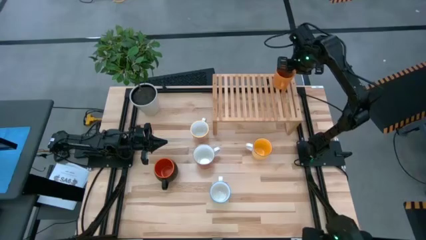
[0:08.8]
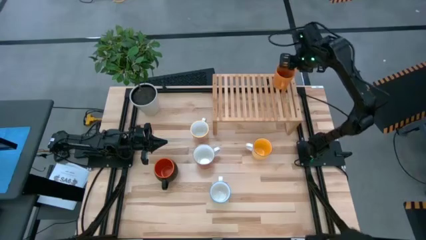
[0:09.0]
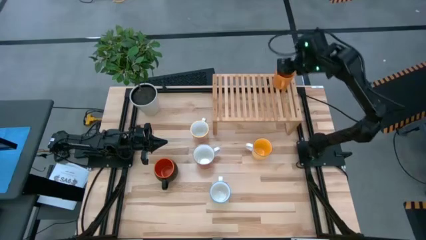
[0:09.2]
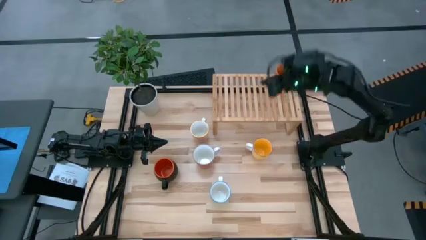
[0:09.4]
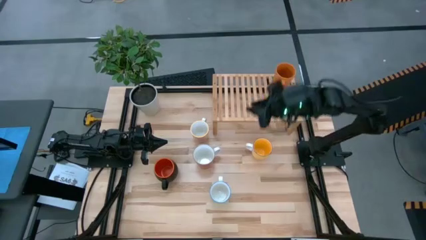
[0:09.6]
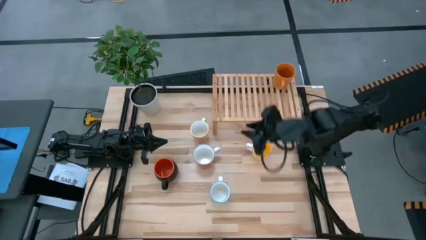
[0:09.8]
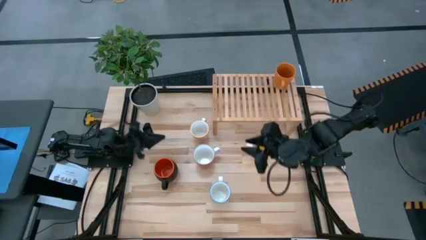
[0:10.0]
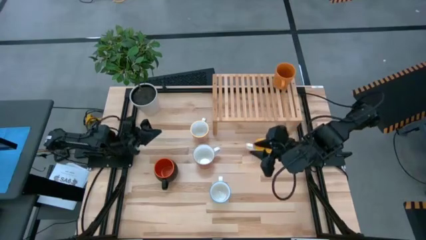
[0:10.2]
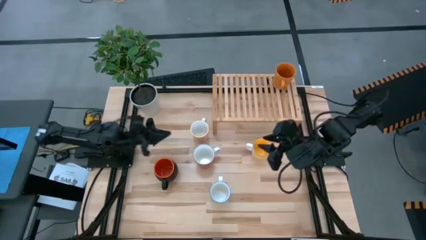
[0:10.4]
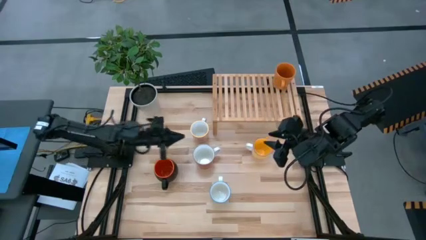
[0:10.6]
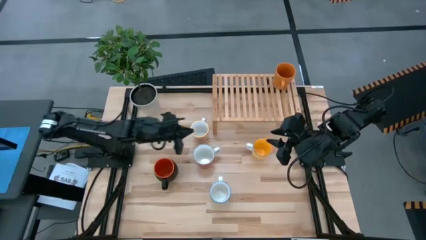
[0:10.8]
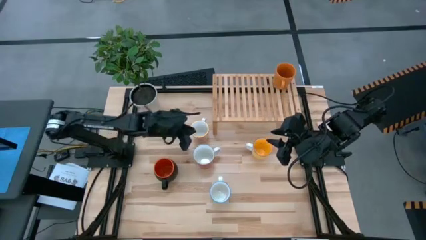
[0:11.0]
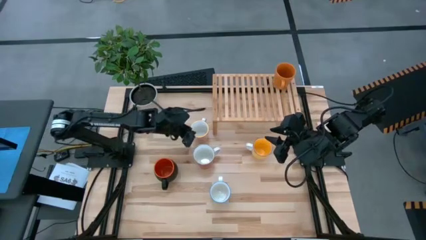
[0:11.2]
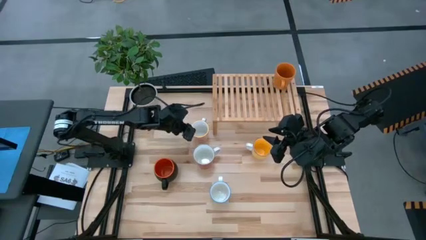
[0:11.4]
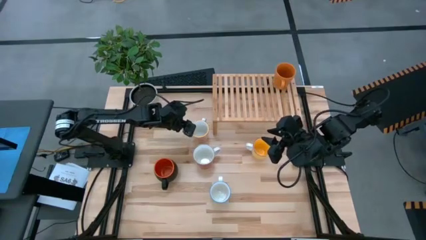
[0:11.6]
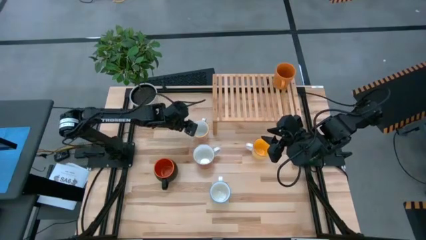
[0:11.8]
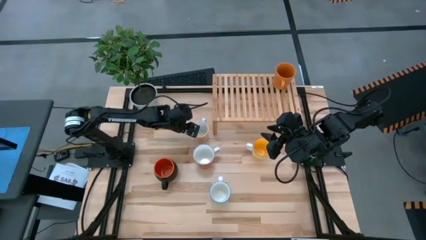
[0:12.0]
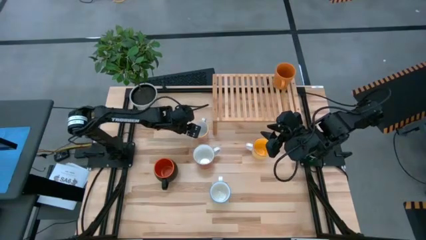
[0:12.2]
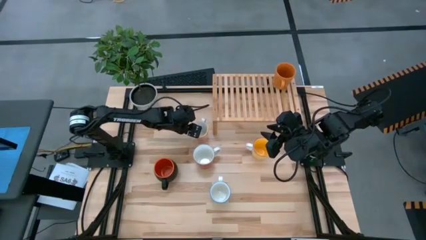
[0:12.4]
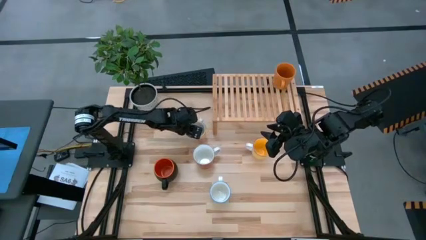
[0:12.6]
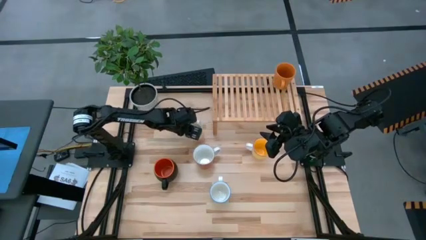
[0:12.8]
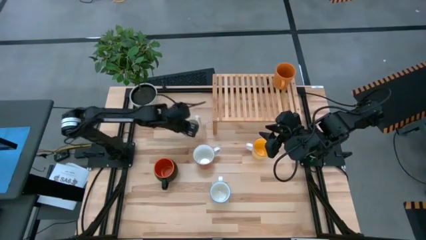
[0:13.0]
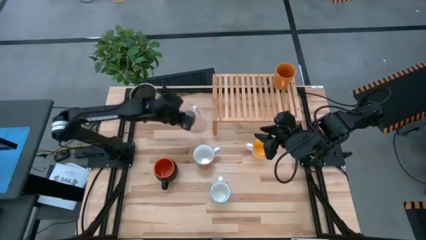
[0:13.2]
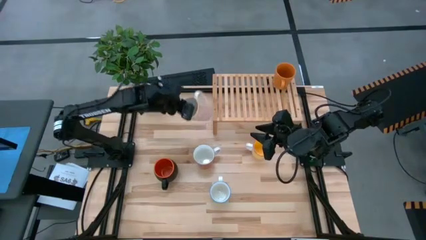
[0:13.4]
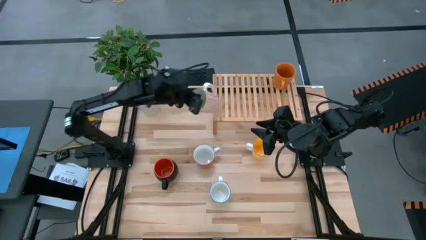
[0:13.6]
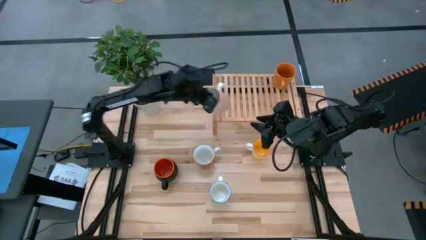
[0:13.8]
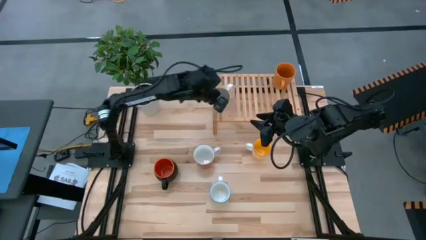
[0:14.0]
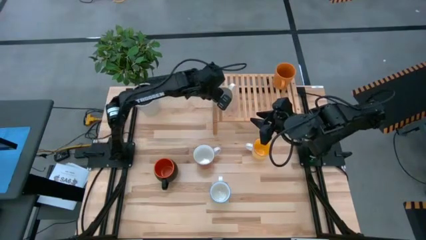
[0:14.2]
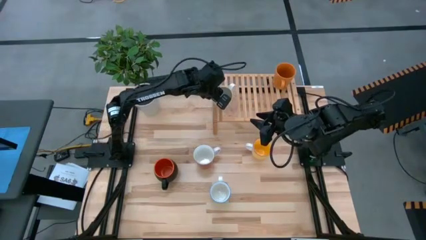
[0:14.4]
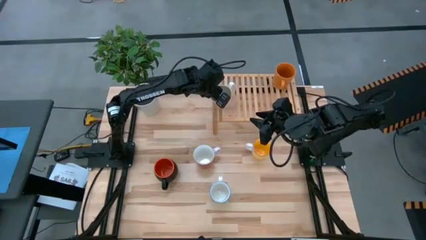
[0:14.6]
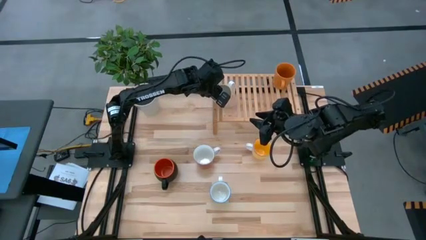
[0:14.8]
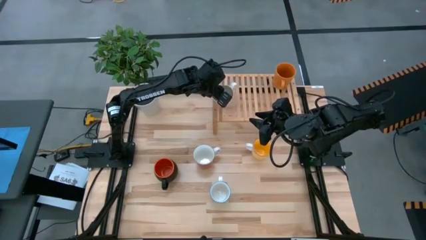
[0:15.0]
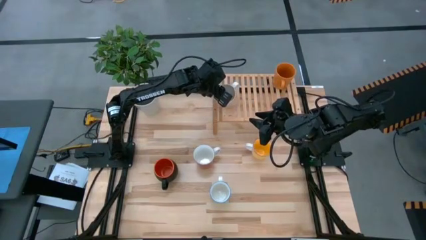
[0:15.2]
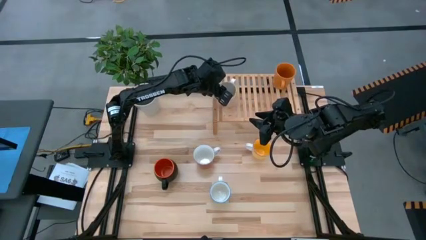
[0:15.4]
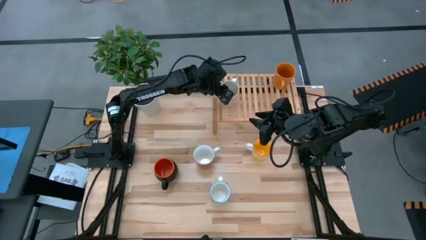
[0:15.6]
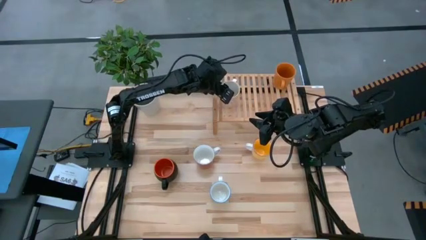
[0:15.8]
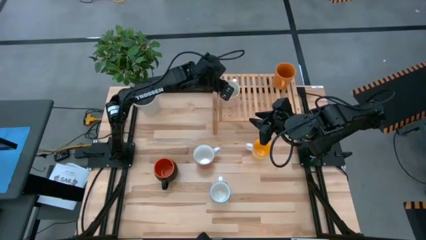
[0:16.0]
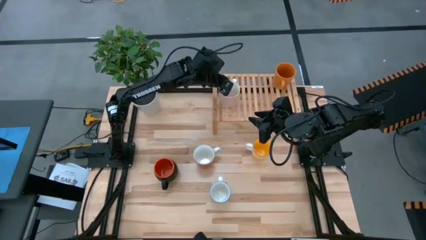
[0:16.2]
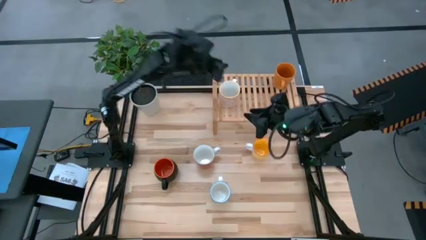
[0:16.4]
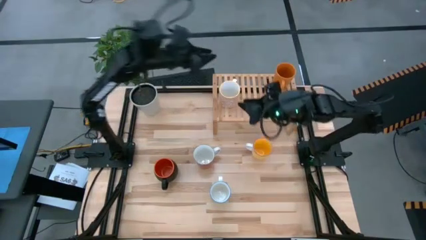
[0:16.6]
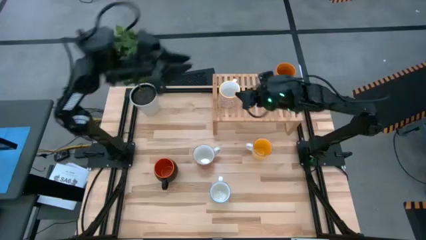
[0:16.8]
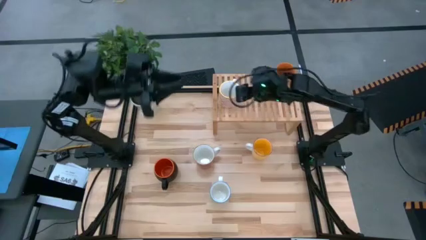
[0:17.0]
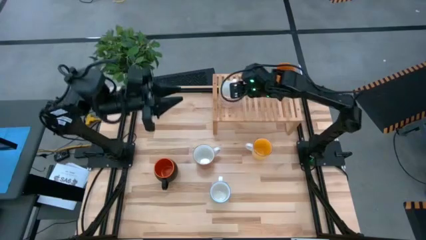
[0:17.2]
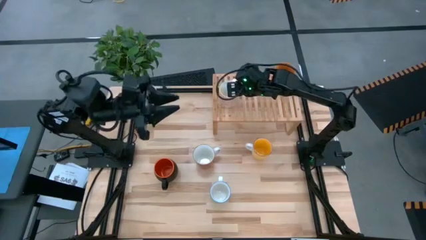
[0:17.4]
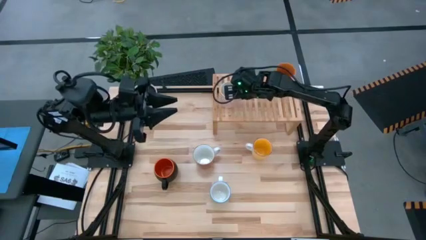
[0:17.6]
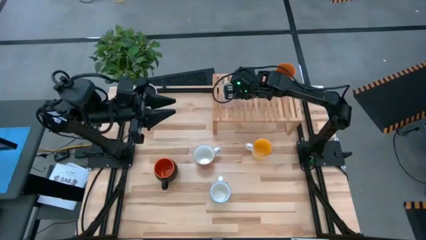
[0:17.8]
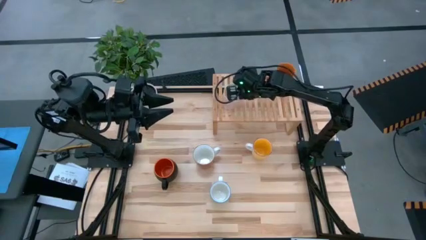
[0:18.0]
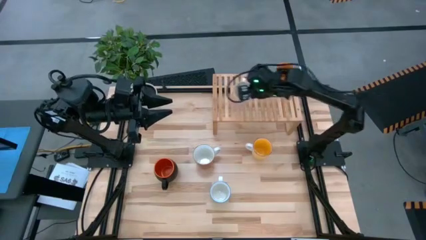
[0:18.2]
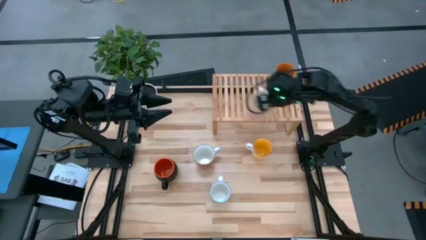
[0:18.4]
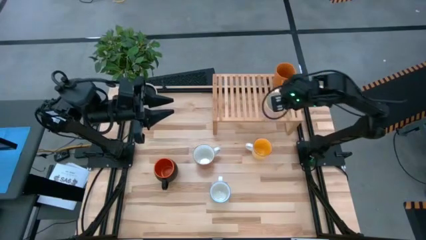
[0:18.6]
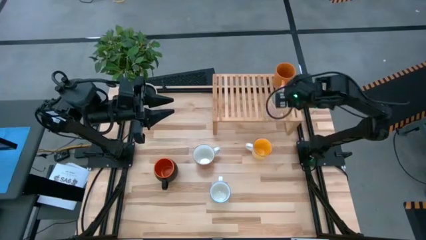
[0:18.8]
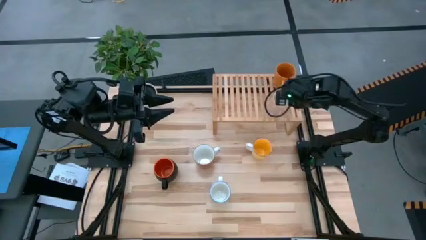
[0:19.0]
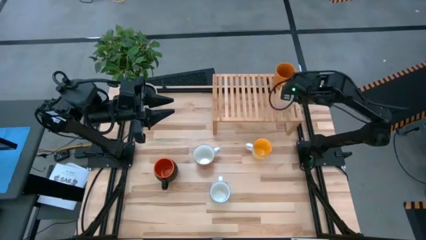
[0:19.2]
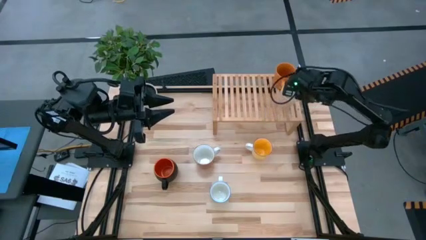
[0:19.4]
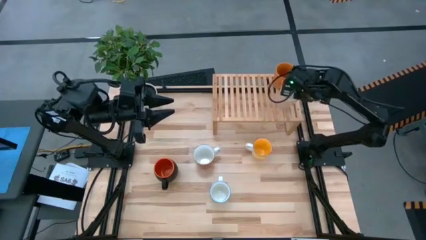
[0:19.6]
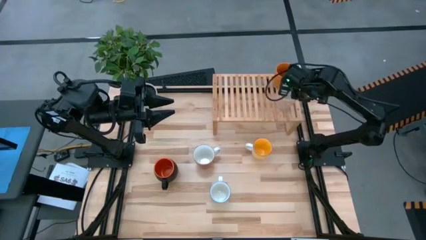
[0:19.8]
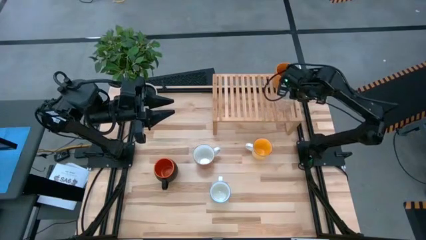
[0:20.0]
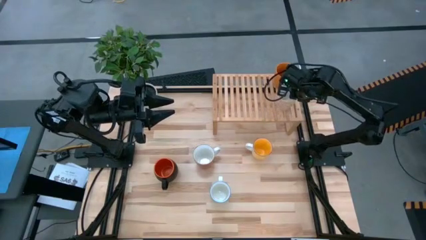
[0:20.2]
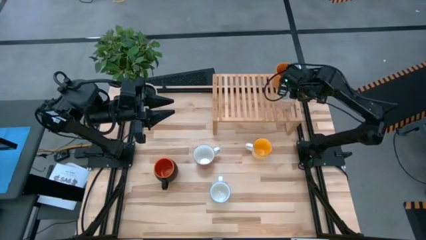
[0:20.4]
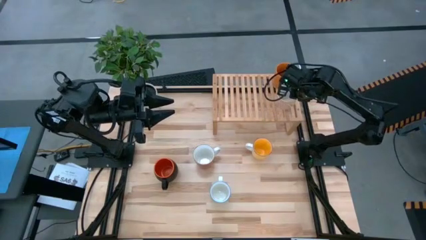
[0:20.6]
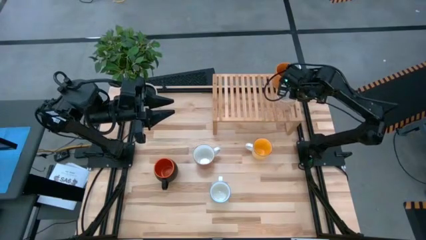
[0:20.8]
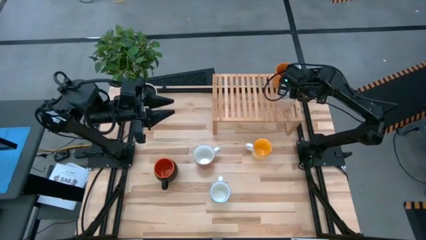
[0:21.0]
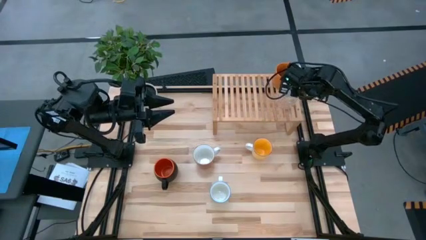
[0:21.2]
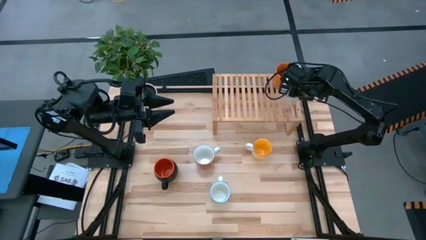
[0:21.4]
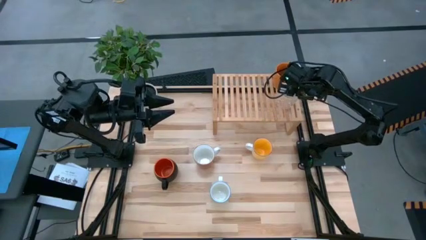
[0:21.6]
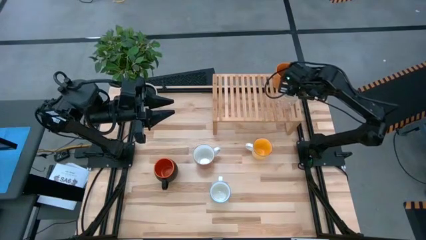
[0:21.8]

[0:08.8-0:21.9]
Task: Place coffee mugs
Put the orange patterned mug on the shelf
